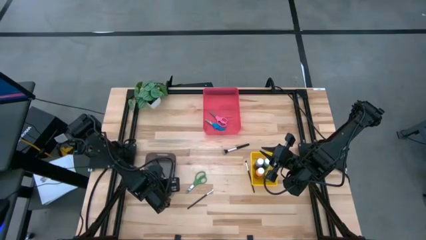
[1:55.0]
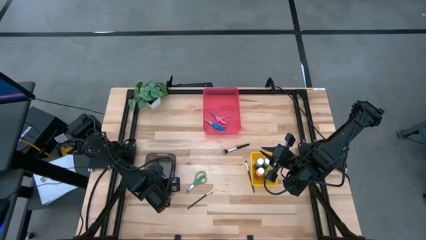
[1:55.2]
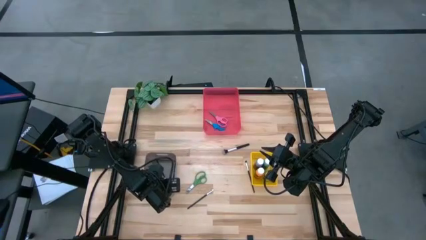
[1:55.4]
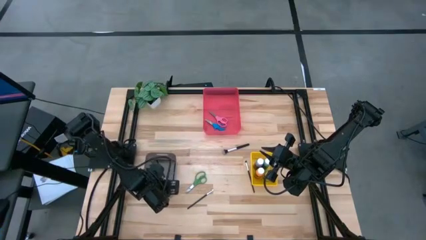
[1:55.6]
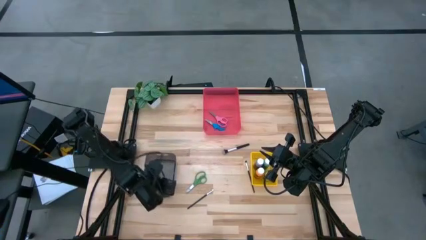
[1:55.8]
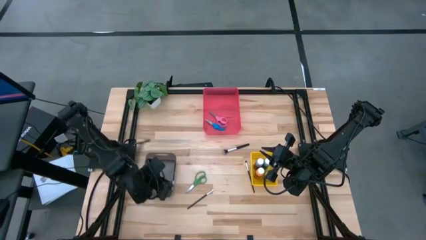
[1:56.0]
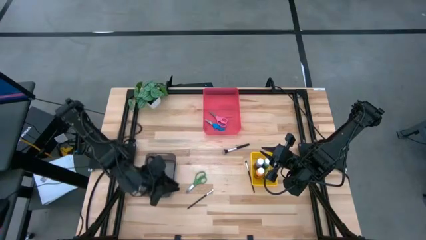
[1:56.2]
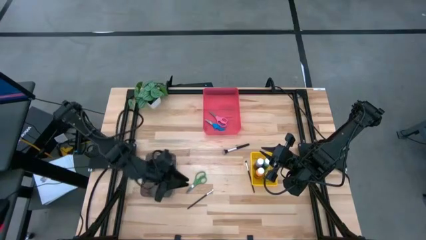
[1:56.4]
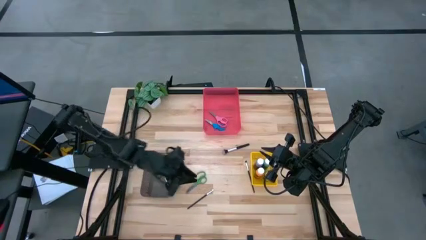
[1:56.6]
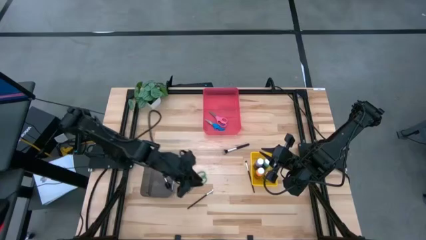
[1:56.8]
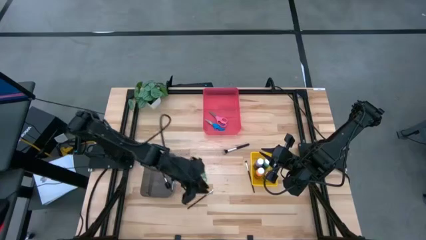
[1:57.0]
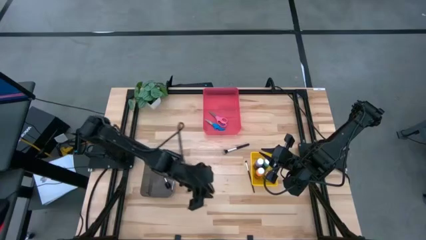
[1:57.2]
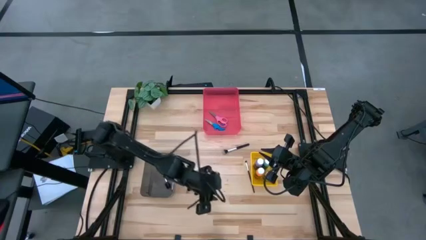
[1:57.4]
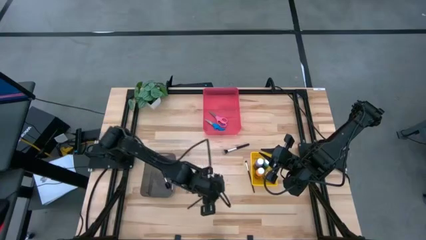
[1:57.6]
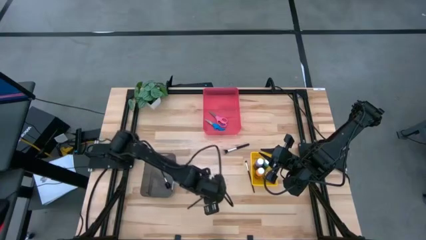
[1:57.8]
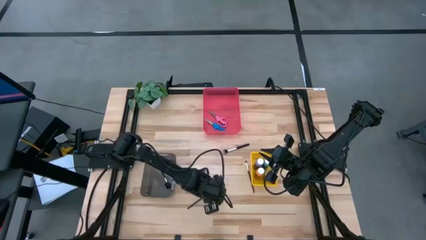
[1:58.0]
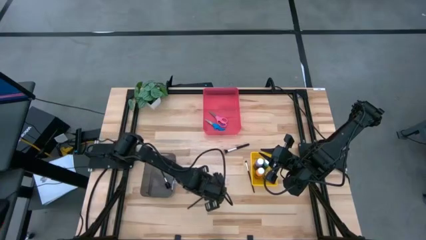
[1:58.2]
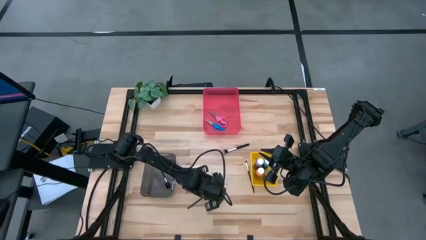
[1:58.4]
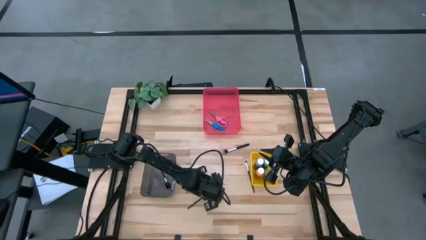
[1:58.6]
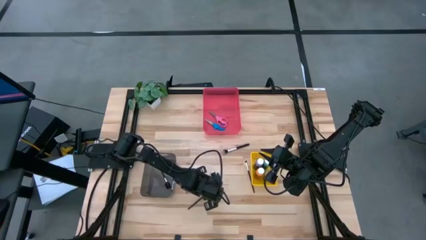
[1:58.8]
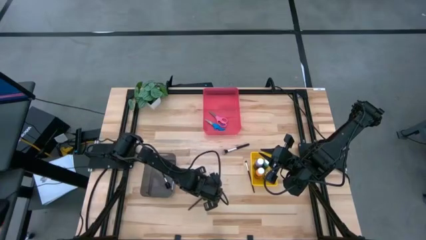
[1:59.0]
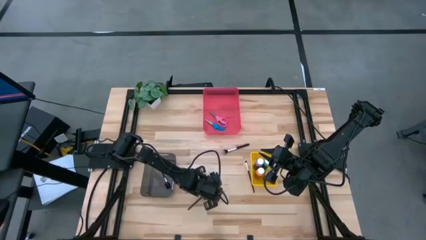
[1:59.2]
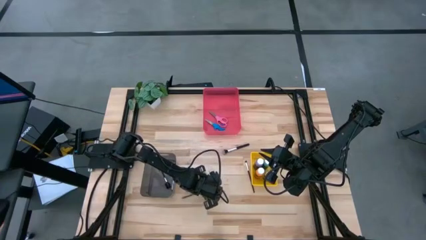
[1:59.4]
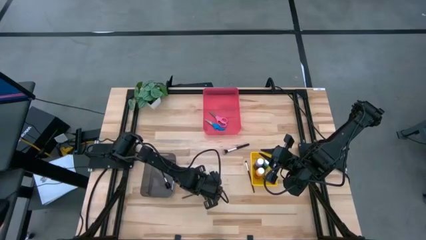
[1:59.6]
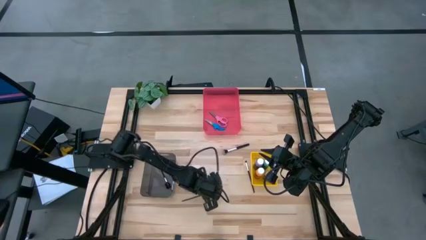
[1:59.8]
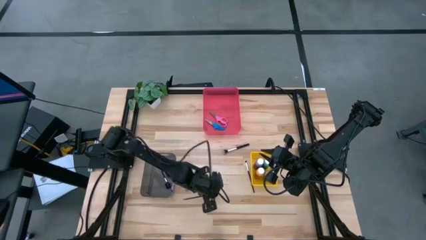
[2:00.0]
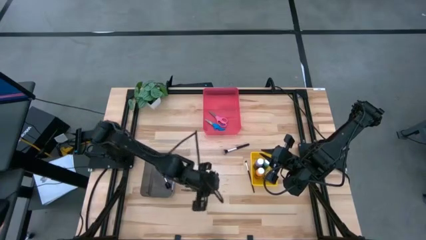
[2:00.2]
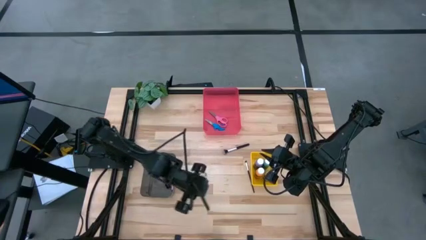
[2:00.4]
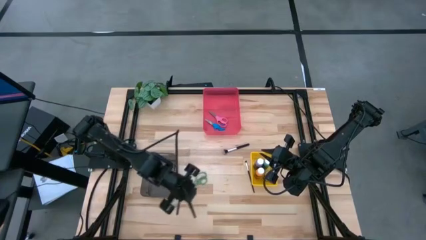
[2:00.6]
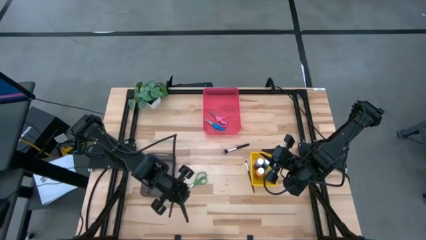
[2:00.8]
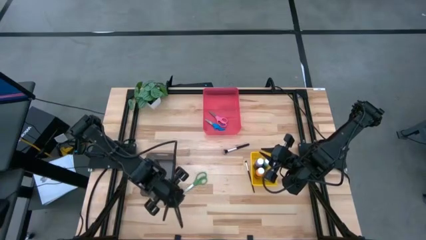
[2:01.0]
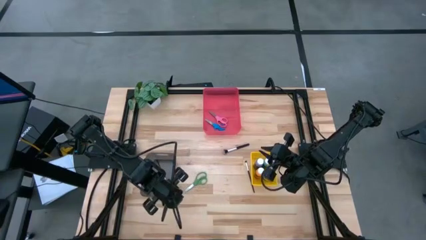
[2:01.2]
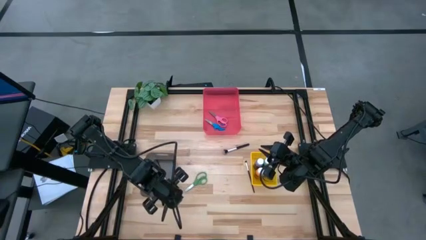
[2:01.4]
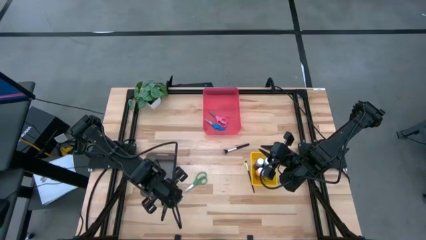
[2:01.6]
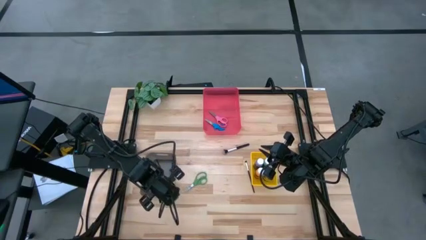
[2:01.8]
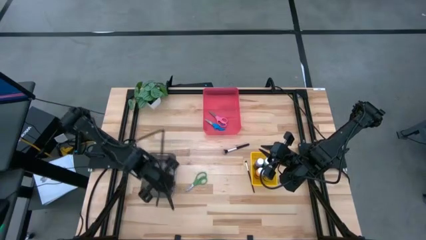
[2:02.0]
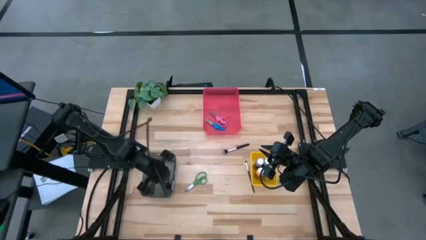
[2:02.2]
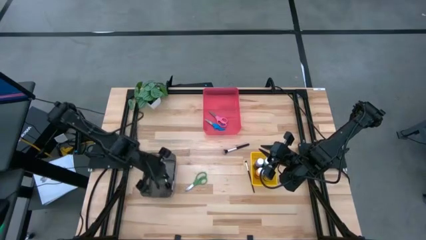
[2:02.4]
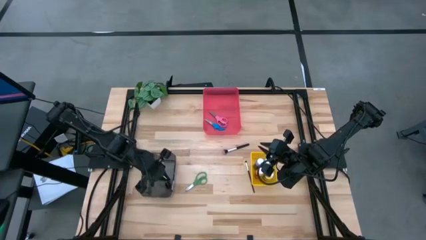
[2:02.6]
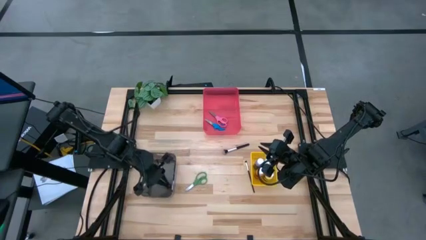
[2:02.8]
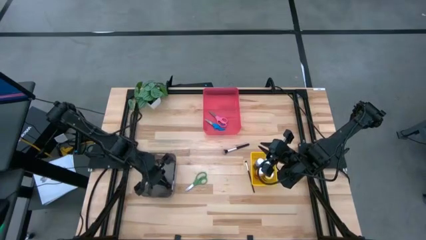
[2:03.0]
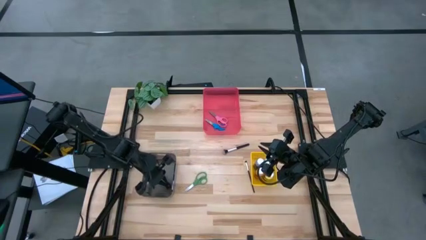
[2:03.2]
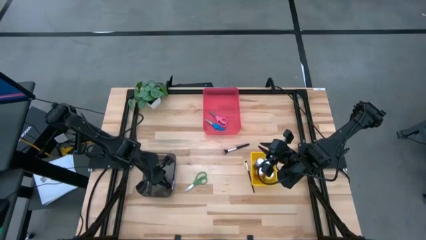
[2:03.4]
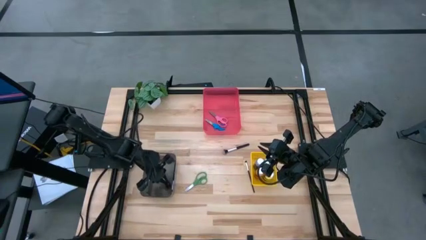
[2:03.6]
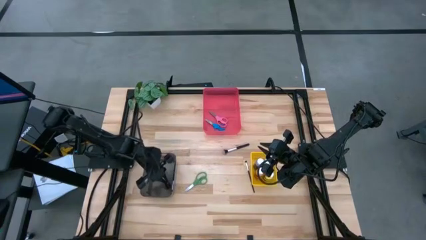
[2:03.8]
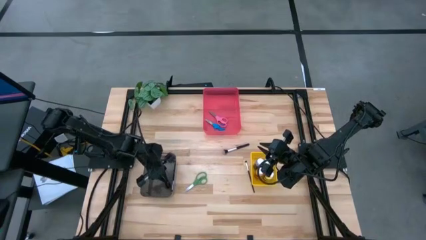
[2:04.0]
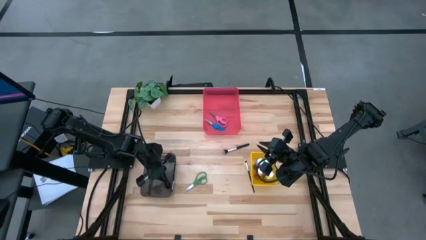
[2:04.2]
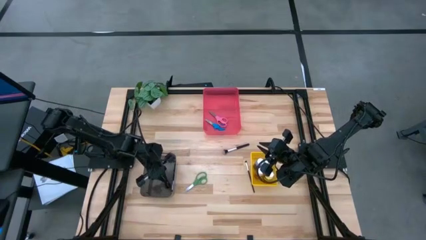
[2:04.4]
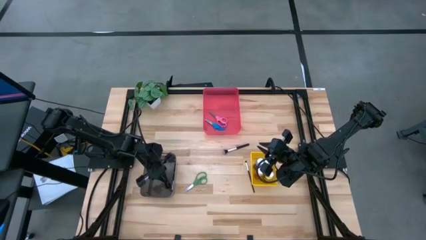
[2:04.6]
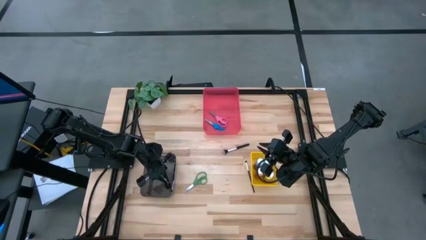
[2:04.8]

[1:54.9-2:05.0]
Task: Pick & Place Paint Supplies
Put the bottom left black makeup brush into the black bin

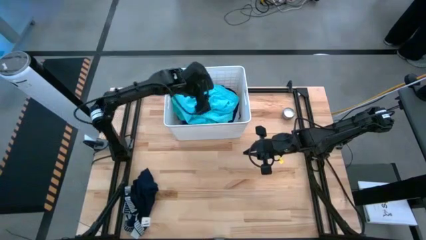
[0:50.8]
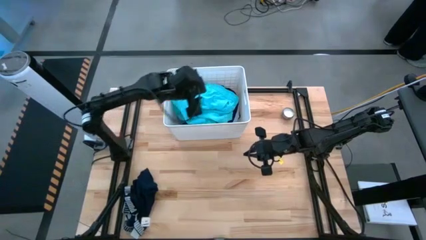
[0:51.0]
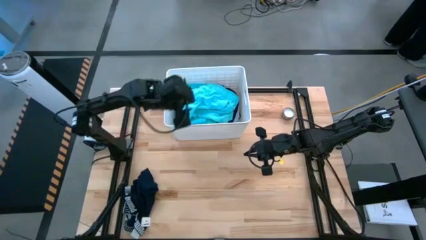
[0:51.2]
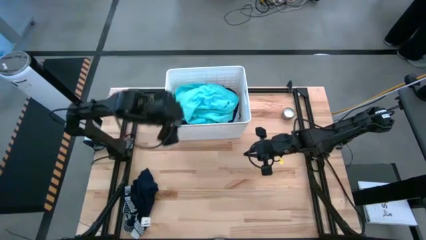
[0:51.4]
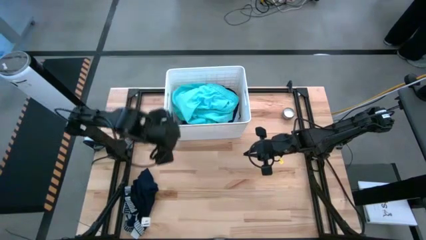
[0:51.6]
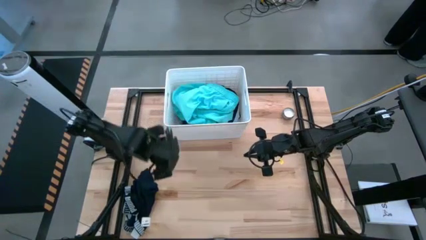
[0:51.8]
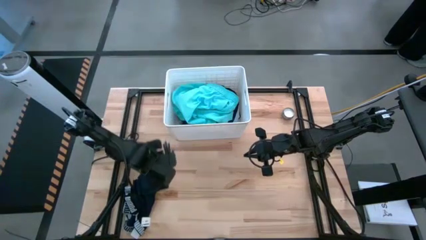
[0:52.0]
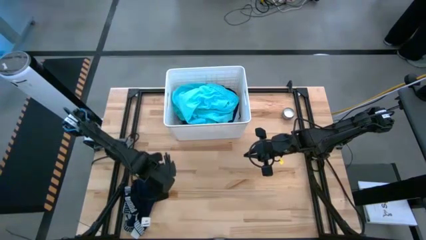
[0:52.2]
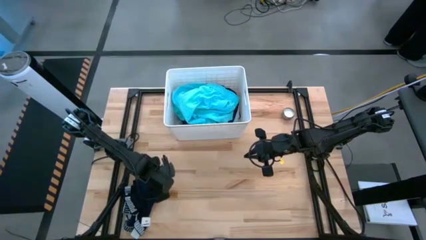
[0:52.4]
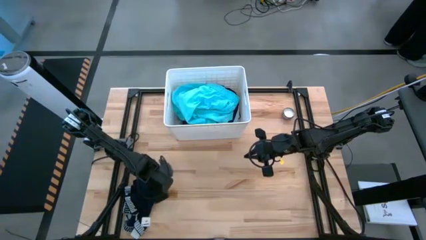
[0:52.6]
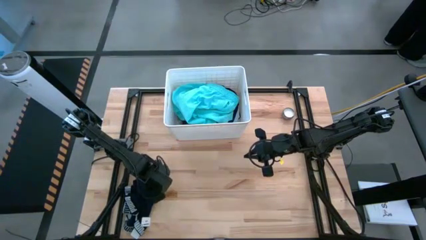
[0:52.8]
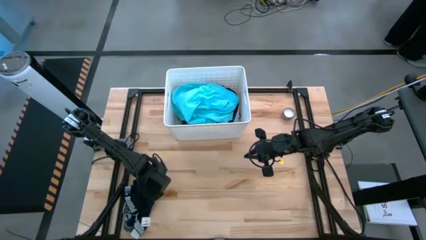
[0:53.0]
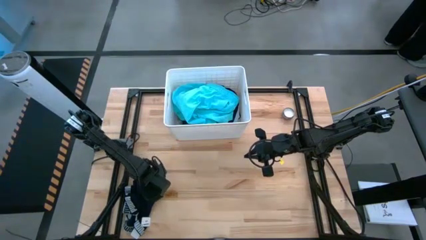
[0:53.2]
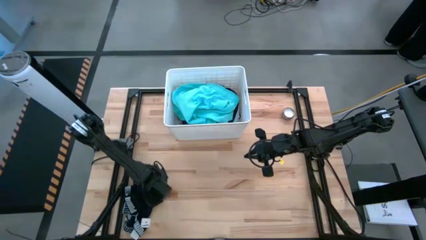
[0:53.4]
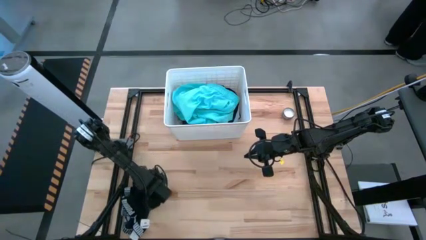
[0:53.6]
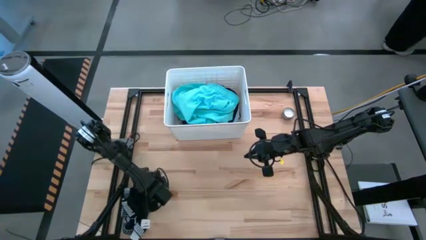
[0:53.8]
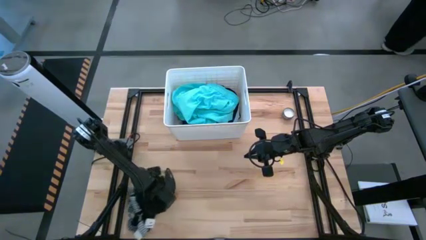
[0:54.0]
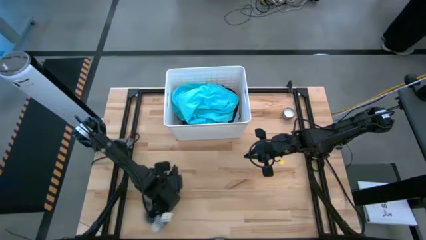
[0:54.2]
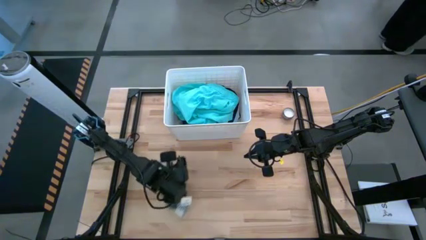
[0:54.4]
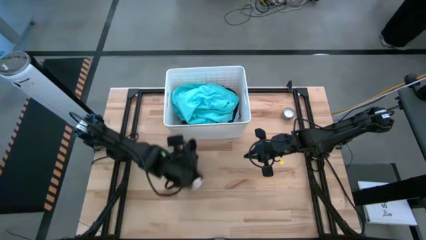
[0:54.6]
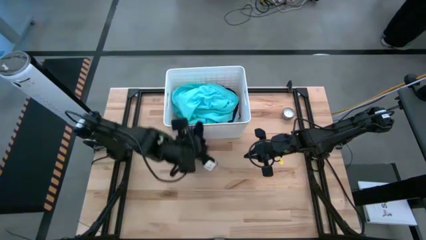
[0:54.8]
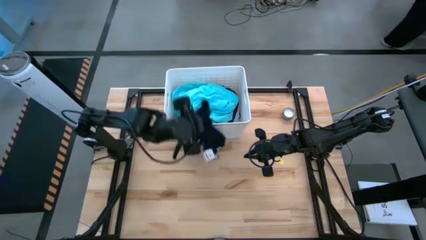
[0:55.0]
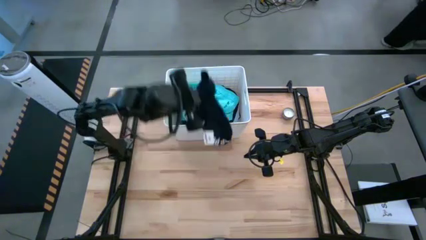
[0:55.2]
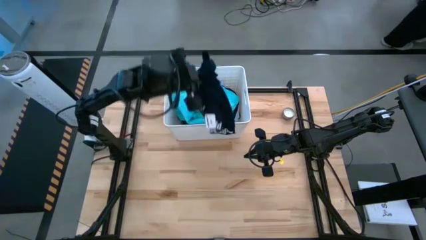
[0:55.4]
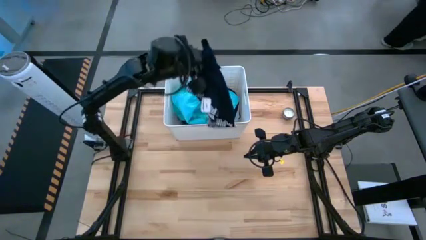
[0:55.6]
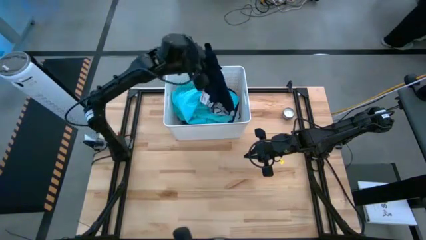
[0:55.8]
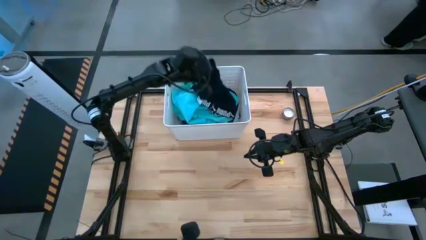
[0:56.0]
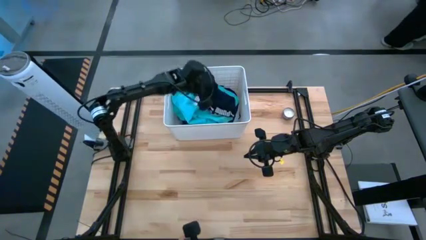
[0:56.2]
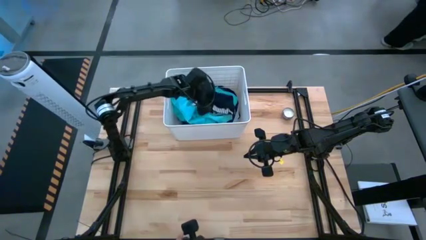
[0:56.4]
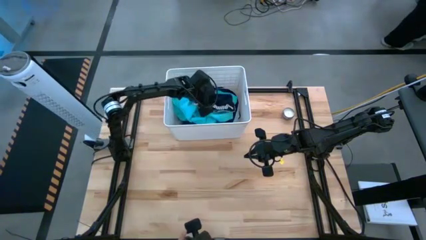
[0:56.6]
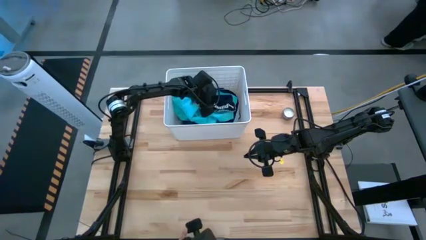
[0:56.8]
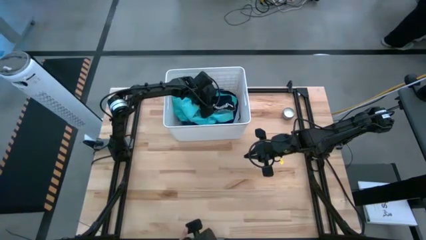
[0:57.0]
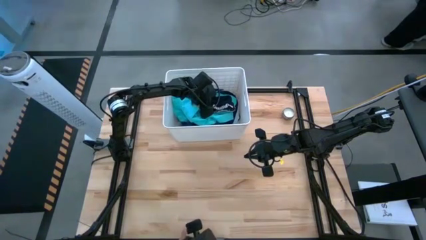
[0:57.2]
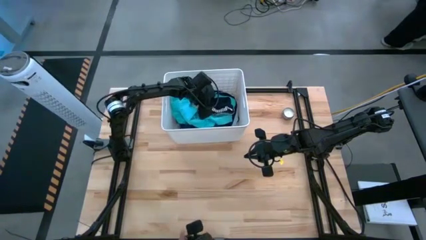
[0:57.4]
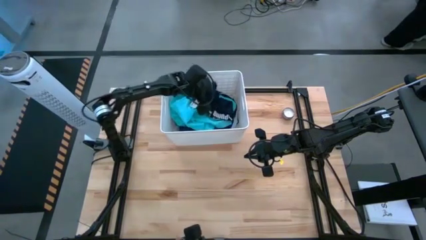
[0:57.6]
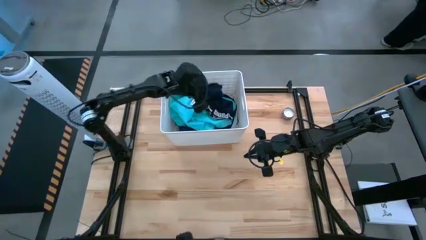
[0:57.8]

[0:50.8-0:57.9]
Task: Sort clothes
Put the blue underwear into the white bin

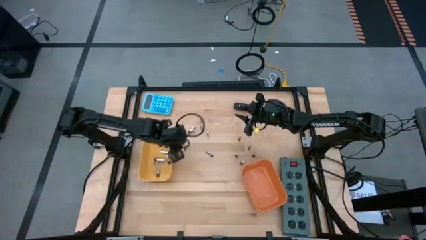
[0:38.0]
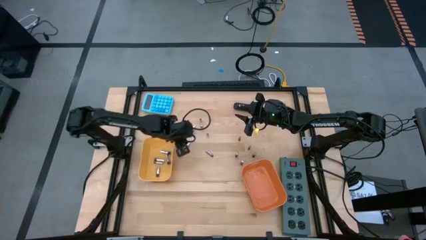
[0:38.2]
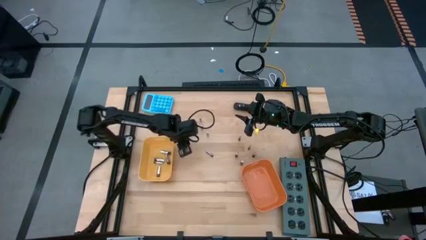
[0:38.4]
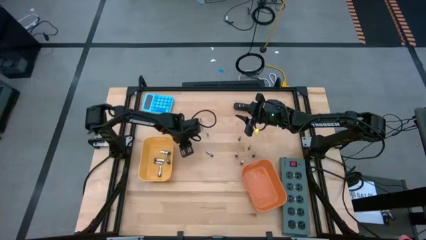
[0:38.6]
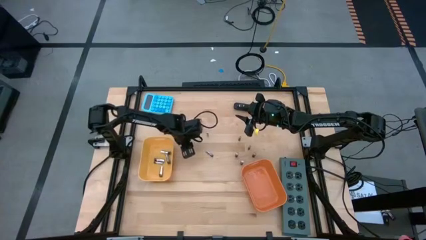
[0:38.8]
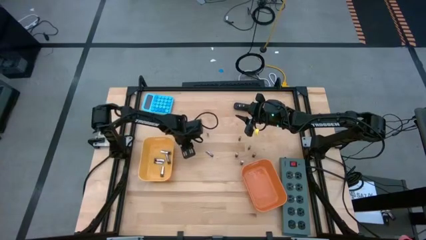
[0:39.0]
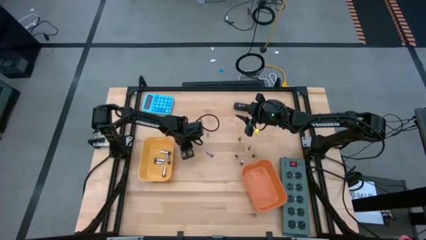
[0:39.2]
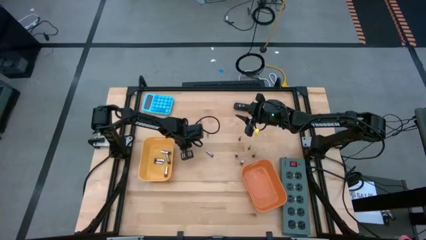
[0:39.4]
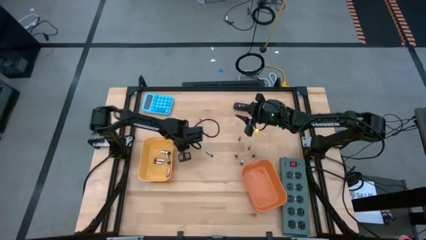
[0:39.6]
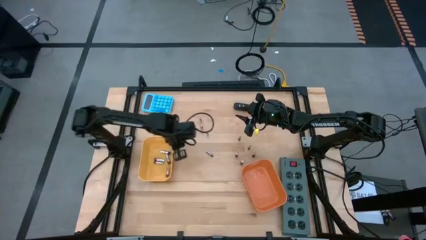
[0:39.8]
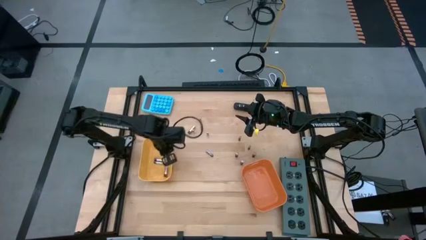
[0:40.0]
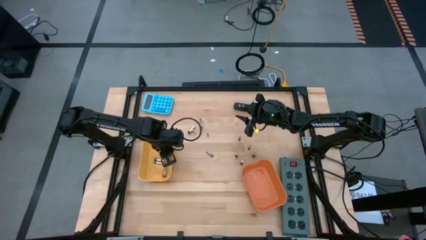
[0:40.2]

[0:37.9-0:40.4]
Task: Sort batteries
Put the silver battery into the yellow bin
